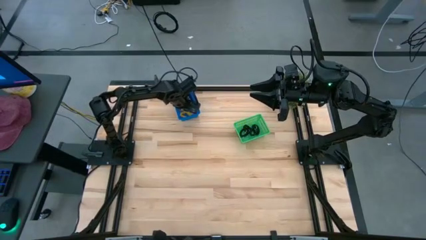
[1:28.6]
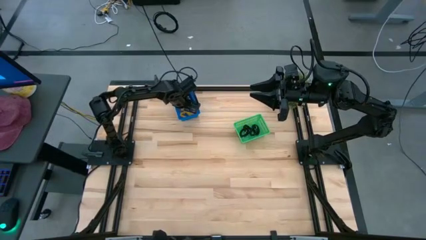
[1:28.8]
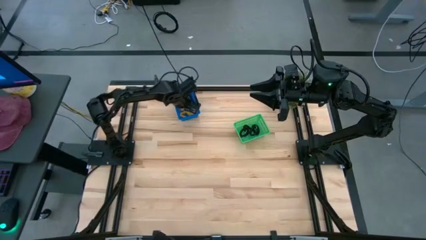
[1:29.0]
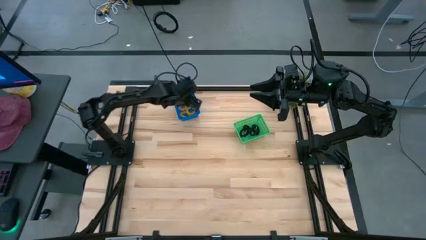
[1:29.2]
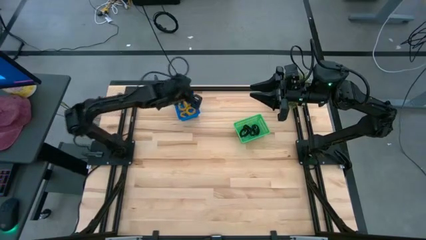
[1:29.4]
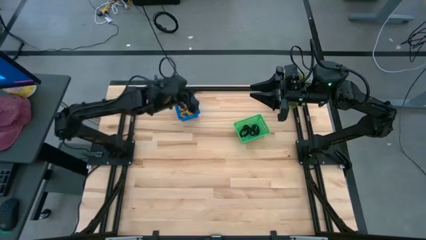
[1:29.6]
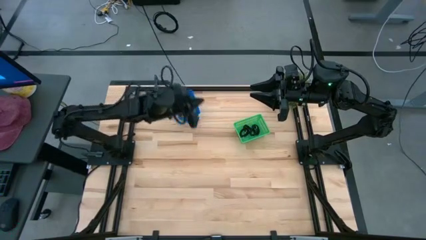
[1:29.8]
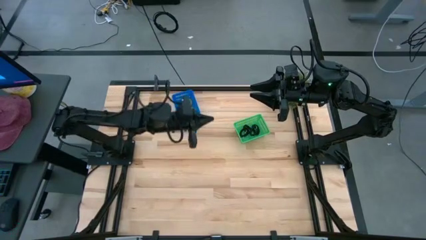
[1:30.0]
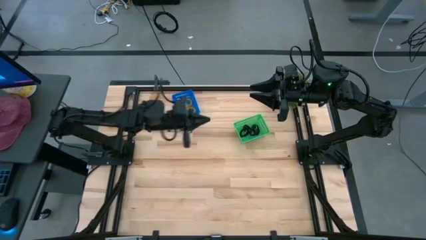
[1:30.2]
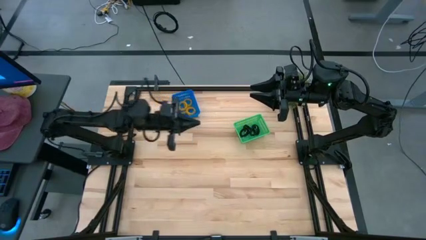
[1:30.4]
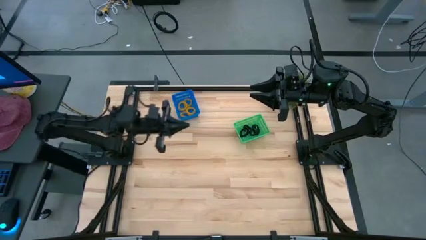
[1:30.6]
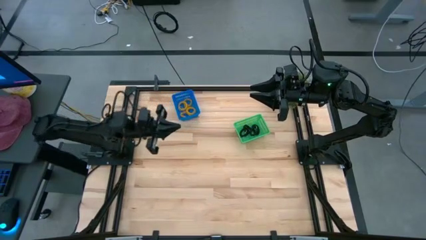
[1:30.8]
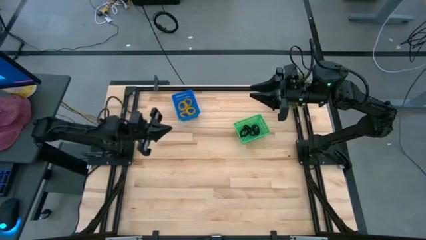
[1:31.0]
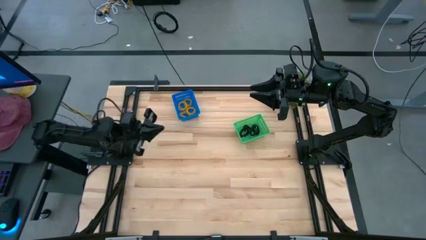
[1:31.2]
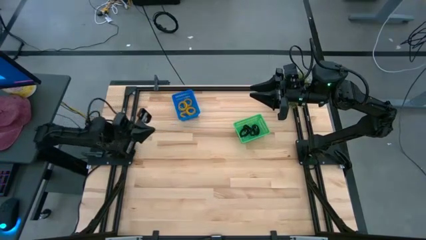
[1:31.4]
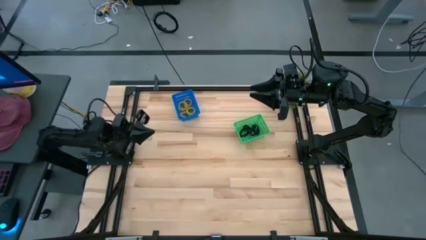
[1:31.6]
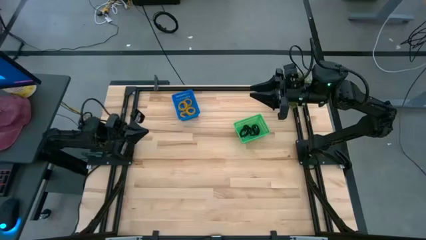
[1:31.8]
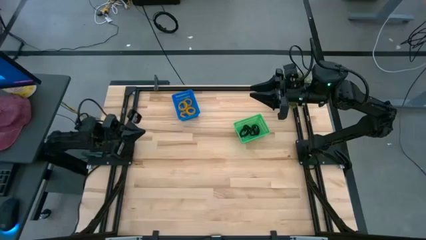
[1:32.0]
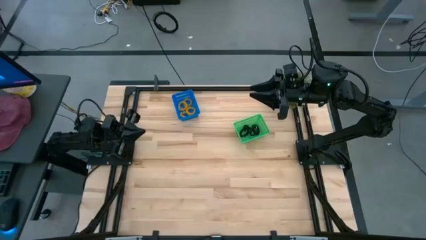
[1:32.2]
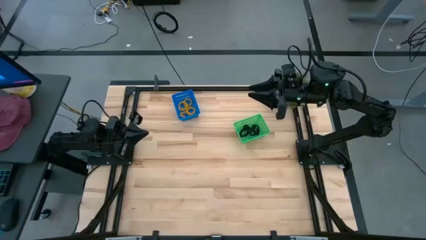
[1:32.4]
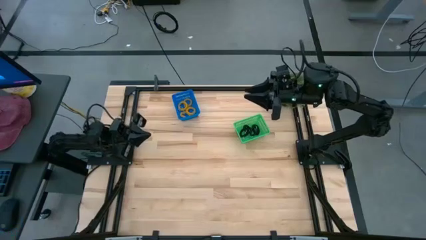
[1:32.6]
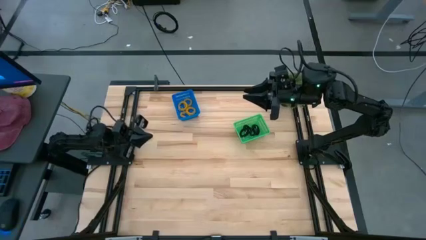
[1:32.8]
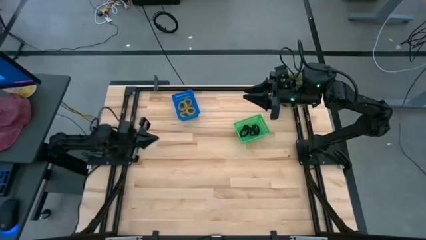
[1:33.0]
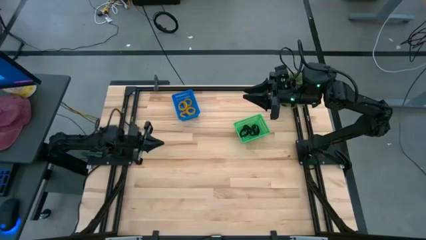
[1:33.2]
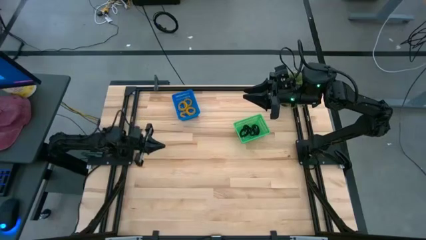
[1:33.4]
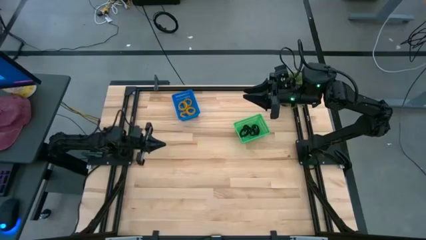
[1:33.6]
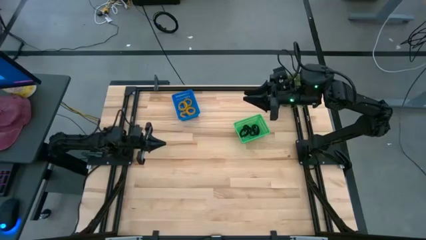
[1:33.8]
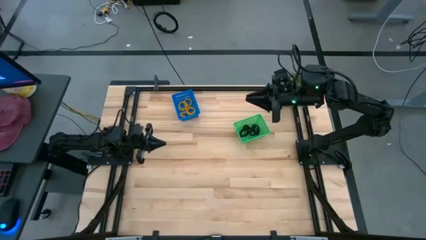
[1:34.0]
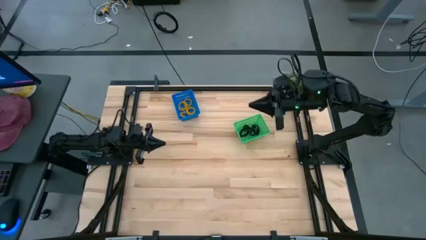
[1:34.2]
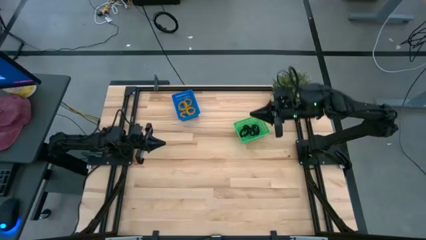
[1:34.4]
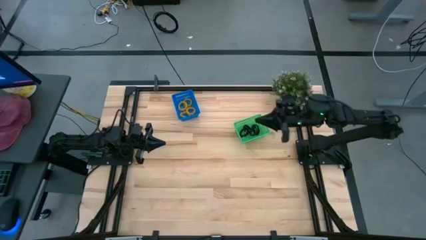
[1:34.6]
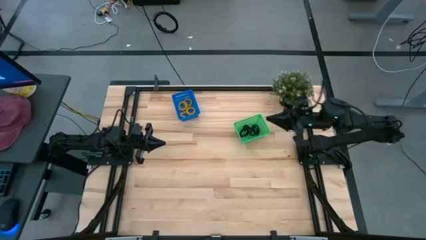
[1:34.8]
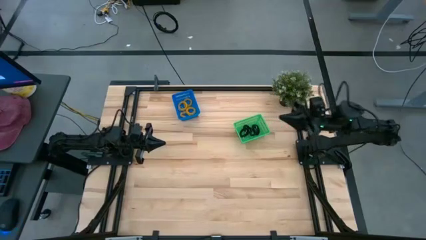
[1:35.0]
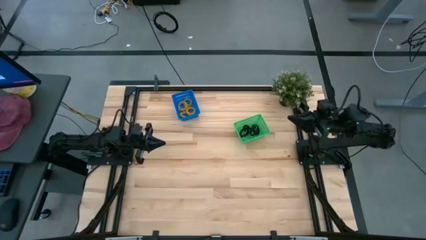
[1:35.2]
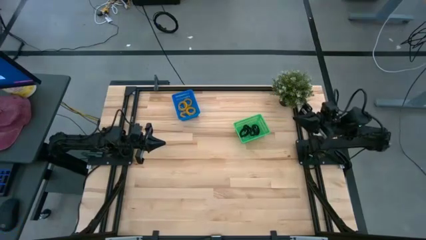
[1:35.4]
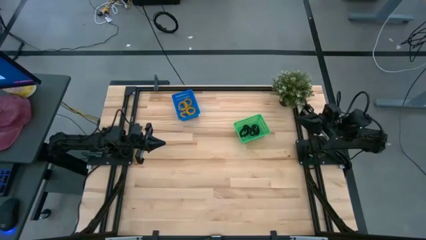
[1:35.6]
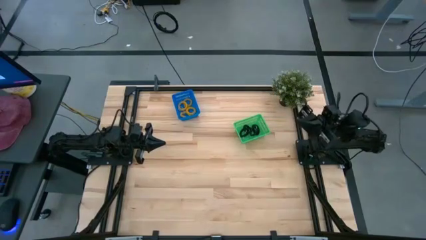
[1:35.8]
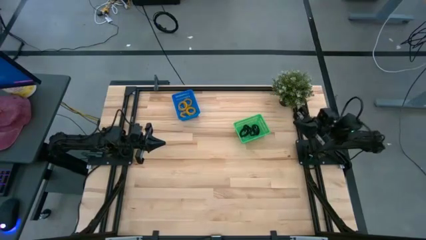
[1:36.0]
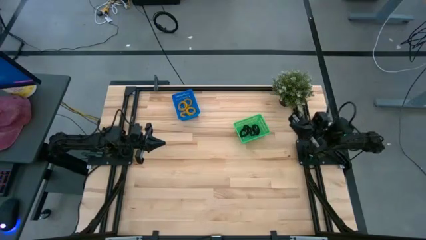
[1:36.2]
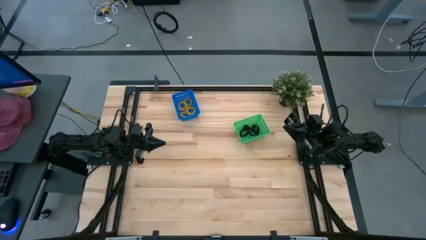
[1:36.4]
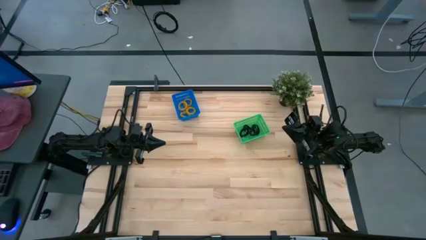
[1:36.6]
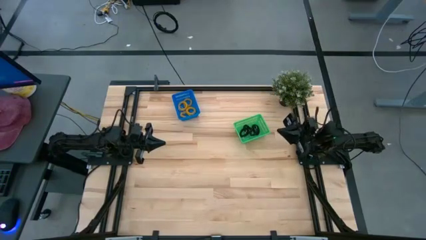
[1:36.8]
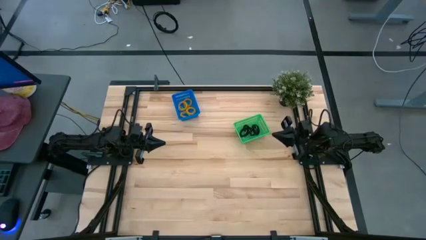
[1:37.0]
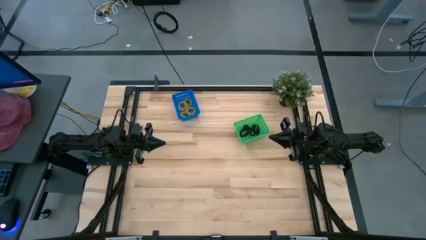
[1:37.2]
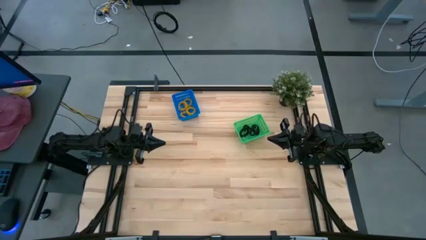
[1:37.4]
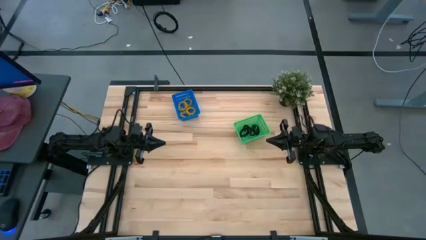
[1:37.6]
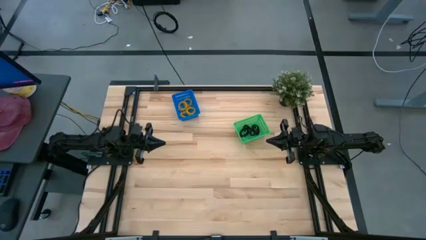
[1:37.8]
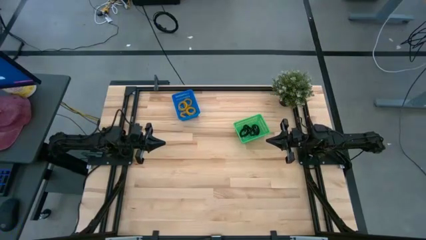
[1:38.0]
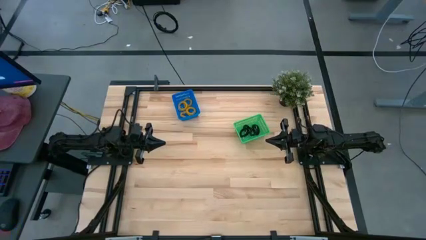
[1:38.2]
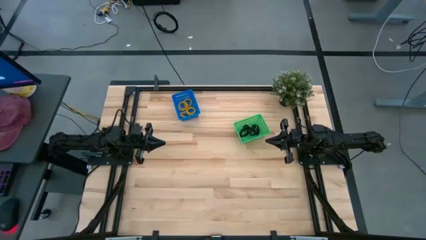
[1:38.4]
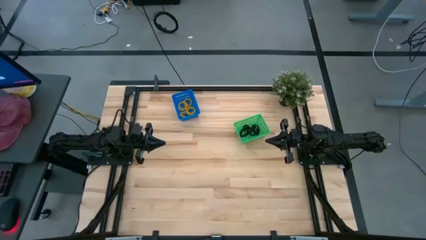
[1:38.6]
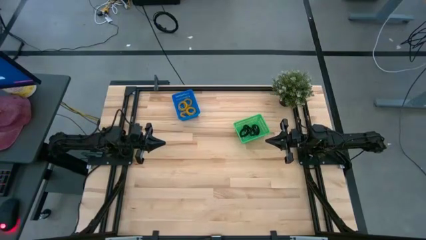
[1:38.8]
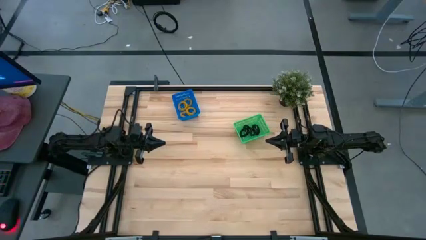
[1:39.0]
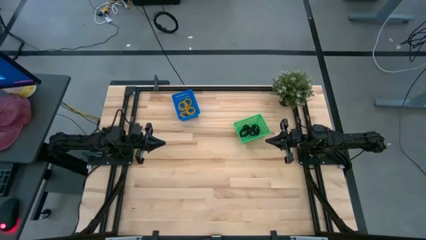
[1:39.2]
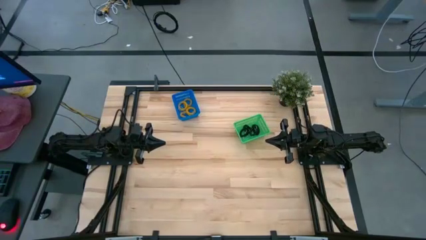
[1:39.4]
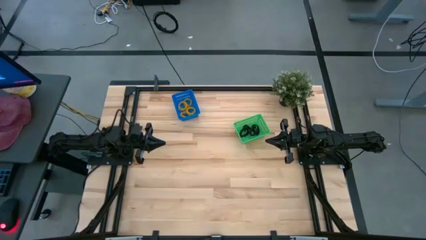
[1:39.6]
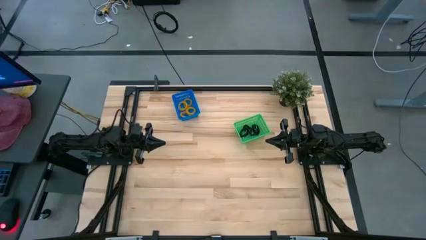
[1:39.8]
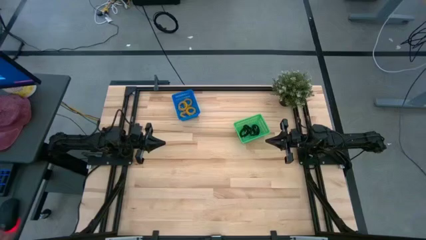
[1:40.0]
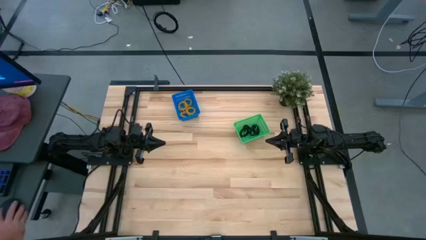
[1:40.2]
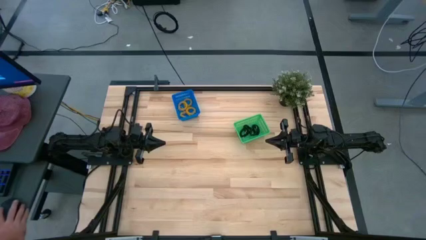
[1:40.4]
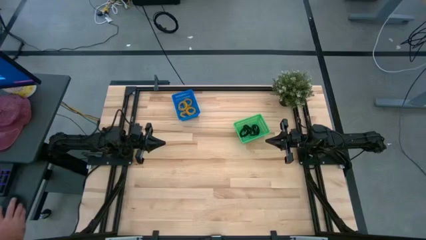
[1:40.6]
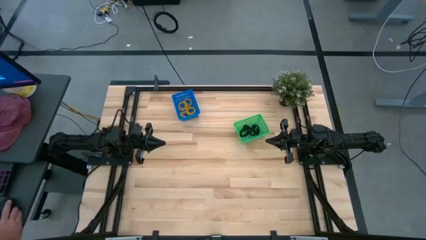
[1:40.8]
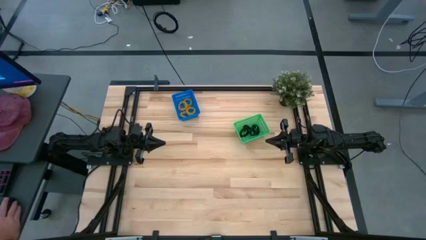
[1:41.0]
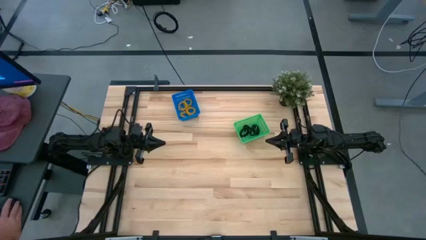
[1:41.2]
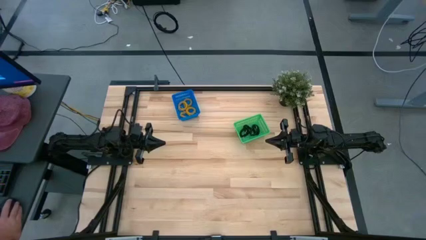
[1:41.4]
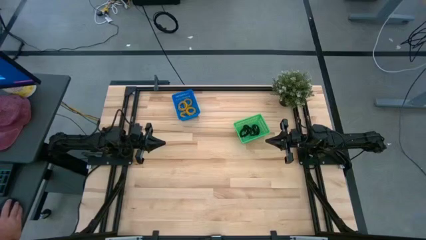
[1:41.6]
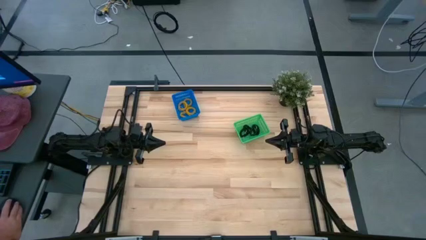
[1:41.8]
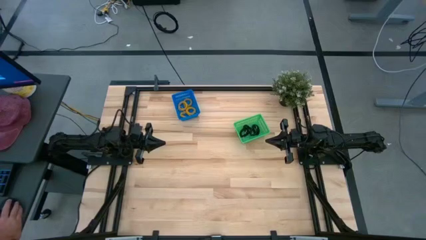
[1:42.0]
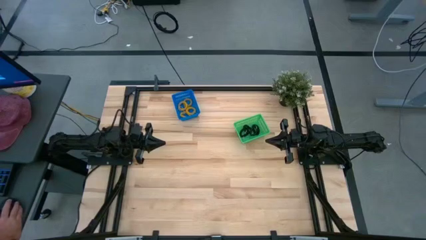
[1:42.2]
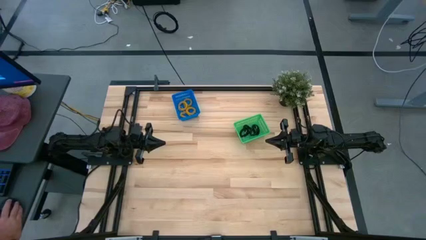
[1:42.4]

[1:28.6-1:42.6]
Task: Sort spring keychains
Return to Home Position
